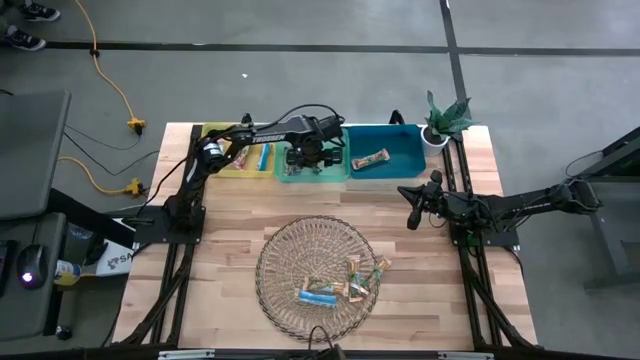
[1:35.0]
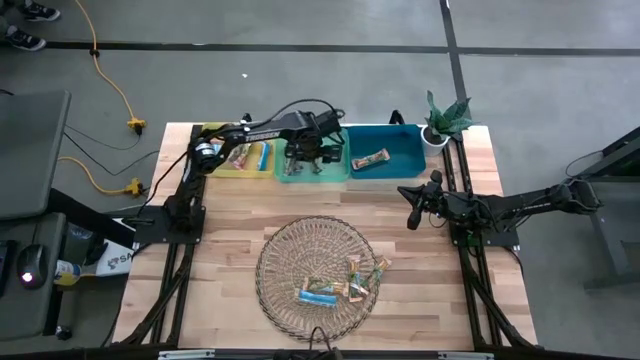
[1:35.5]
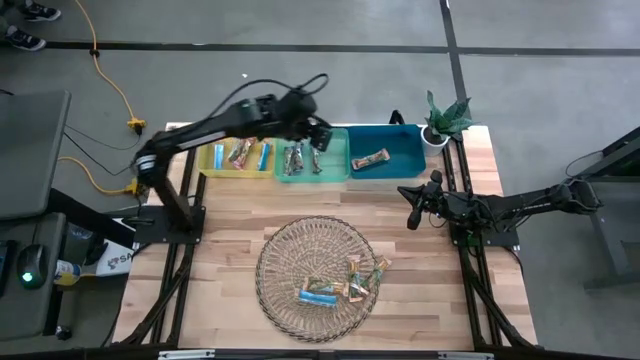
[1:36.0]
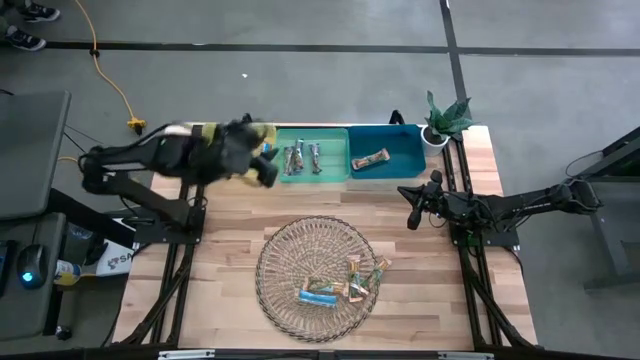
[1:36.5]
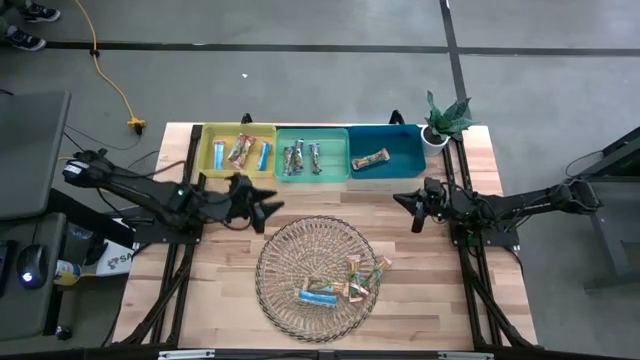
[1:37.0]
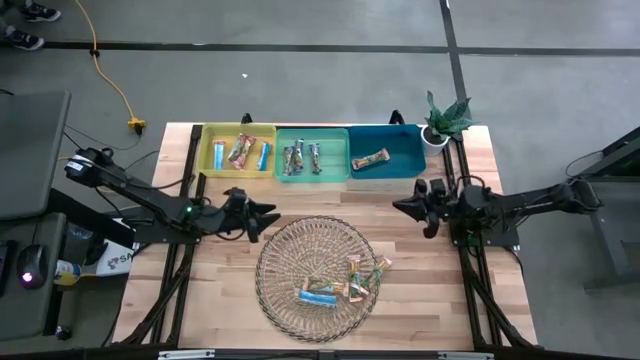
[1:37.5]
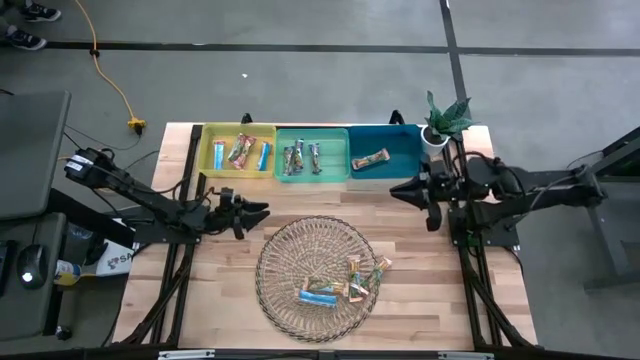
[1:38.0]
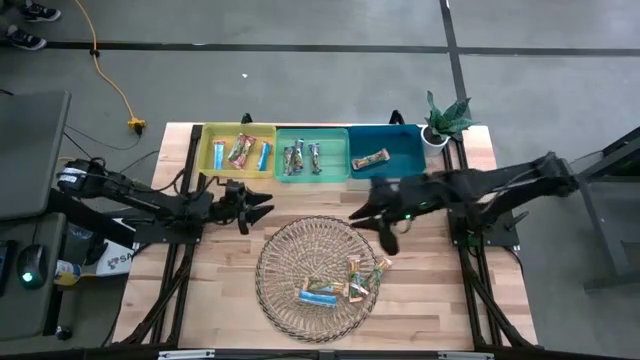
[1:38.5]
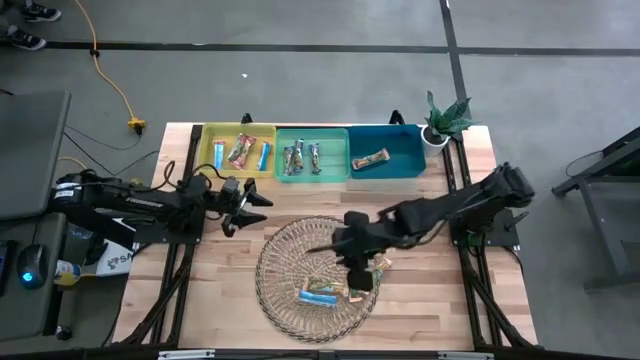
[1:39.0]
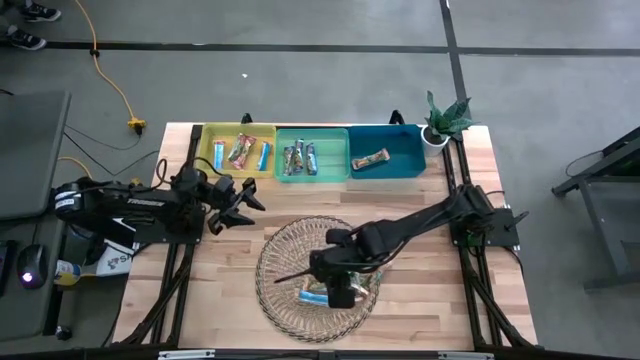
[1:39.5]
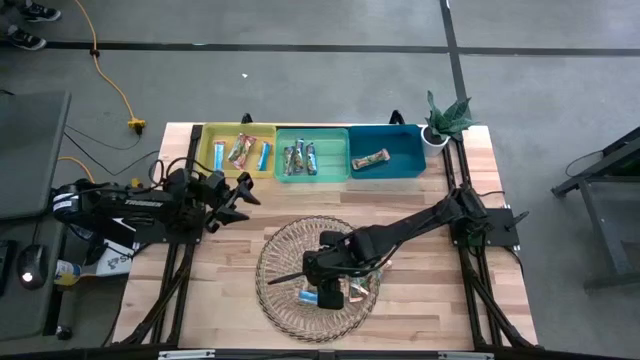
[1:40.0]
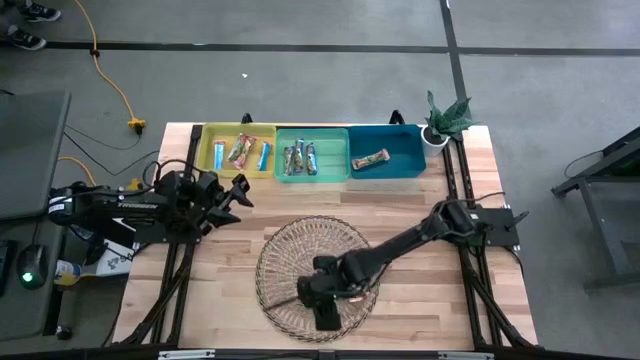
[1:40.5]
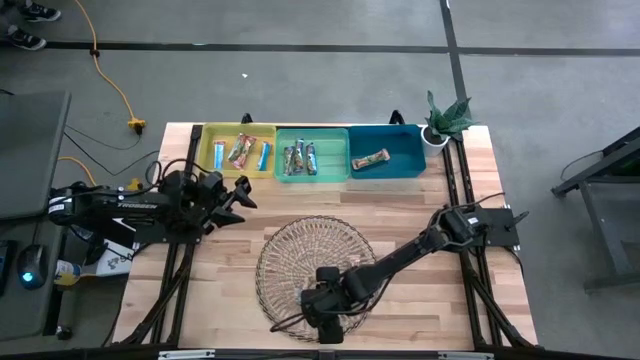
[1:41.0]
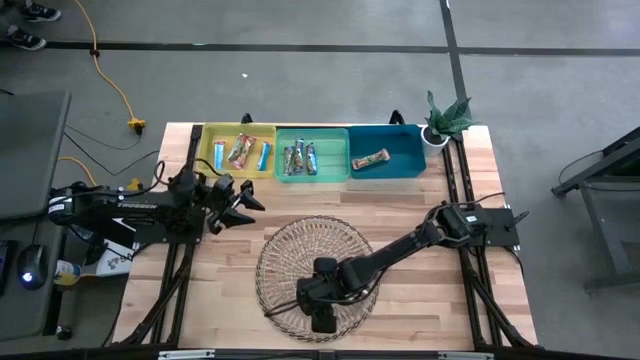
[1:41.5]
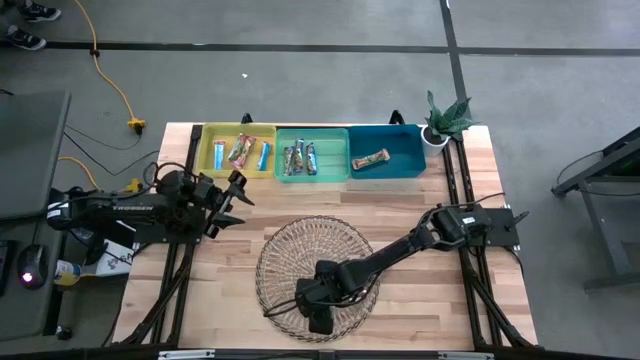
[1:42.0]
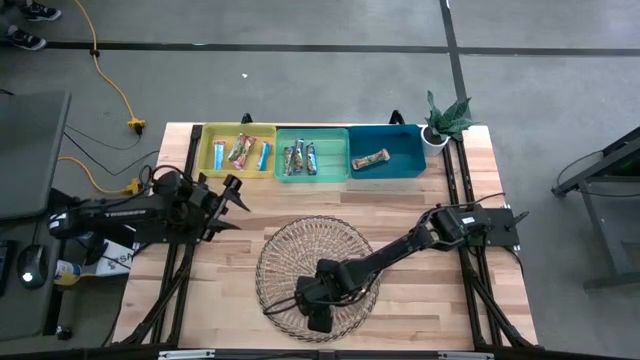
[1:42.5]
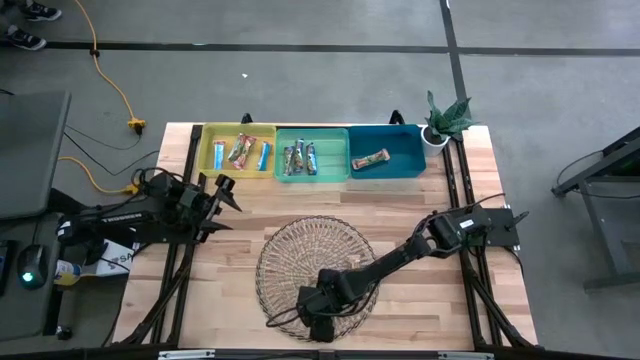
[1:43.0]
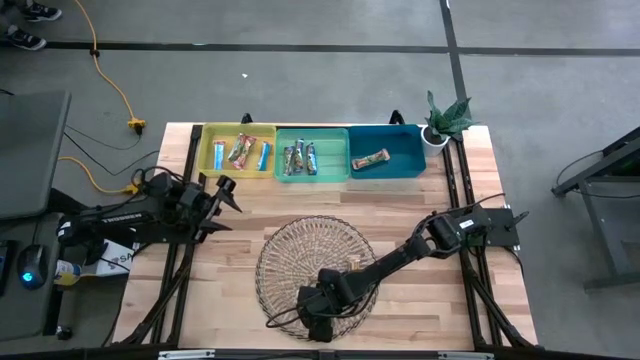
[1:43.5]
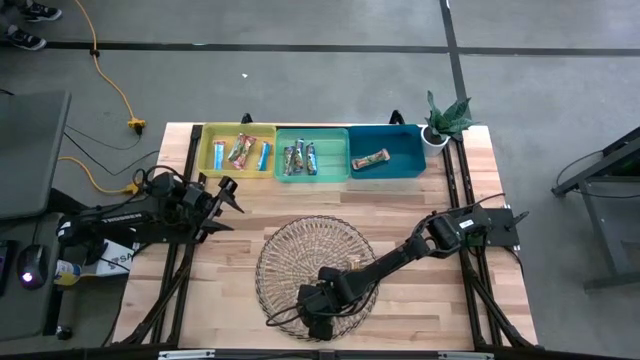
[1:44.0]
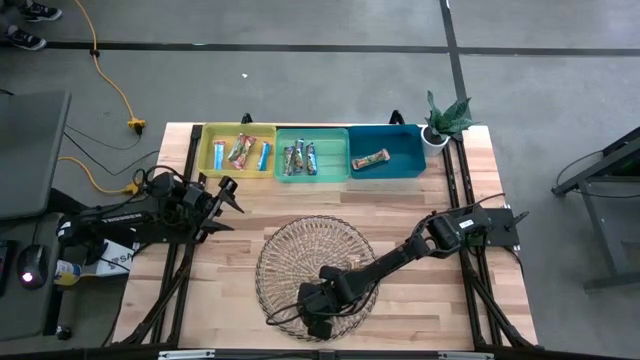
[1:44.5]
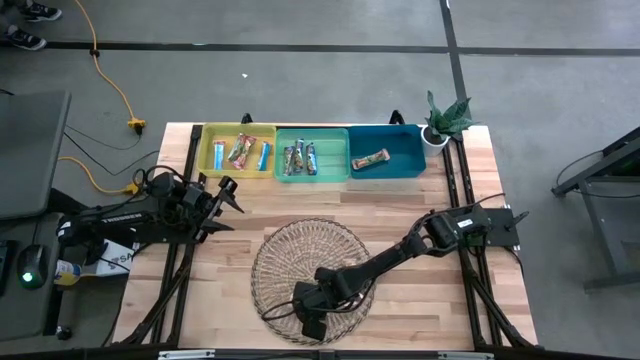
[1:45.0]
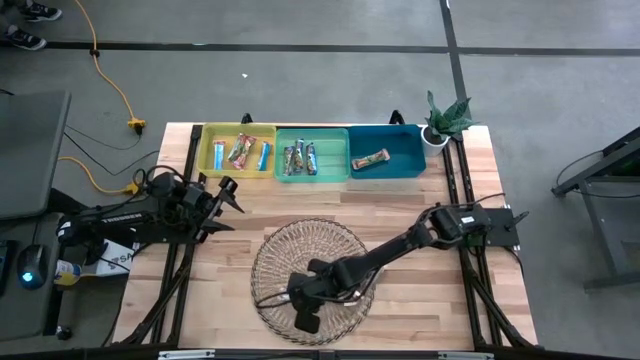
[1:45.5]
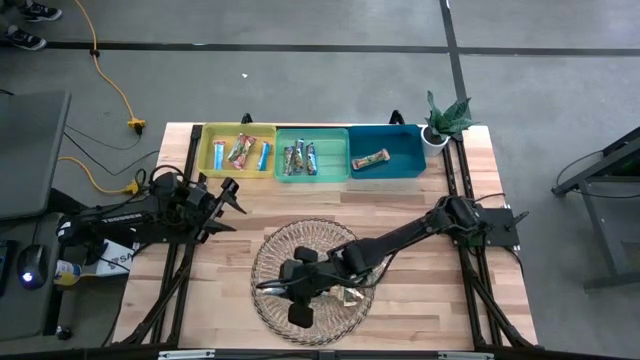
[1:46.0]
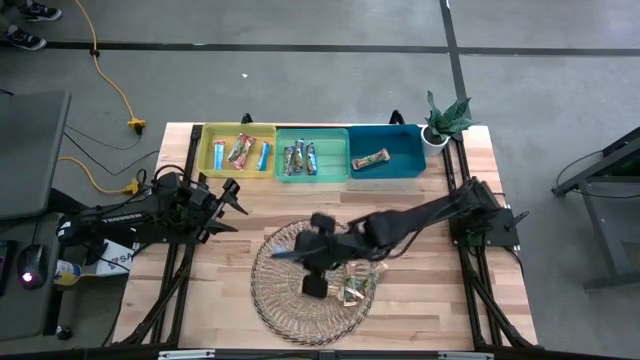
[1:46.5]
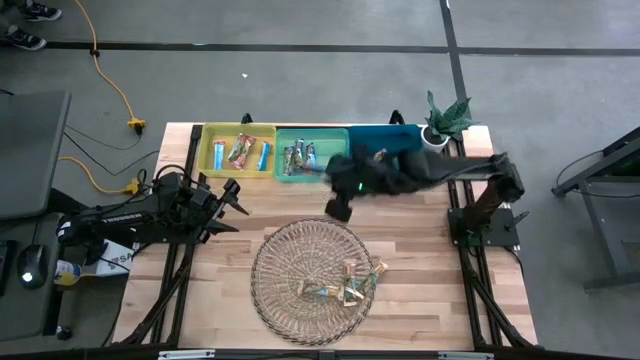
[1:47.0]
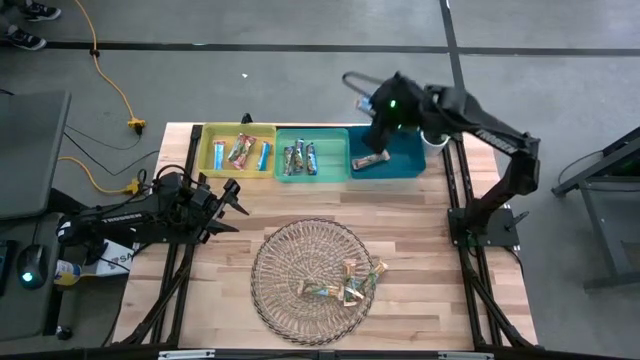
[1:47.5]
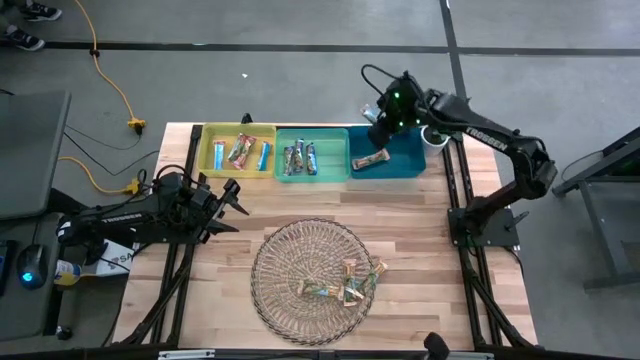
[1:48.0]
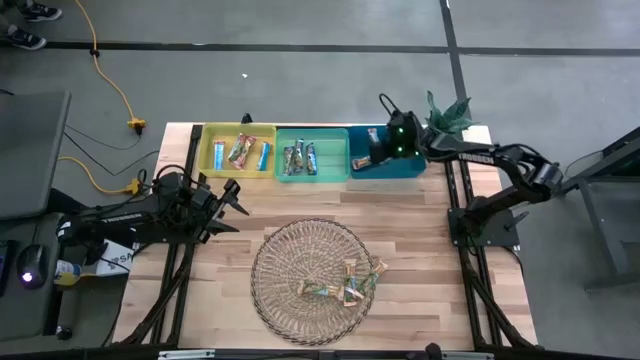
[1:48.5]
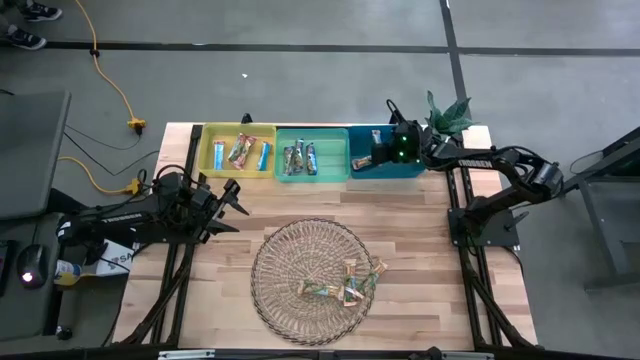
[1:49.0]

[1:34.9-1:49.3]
Task: Pick and place Granola Bars by type
Put the yellow granola bar into the blue bin

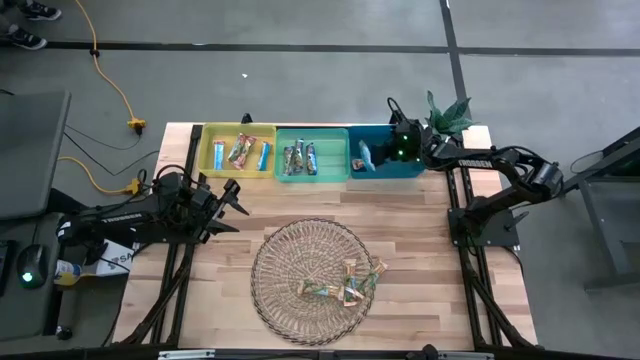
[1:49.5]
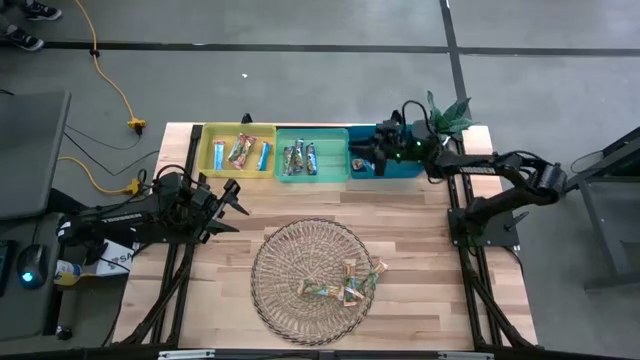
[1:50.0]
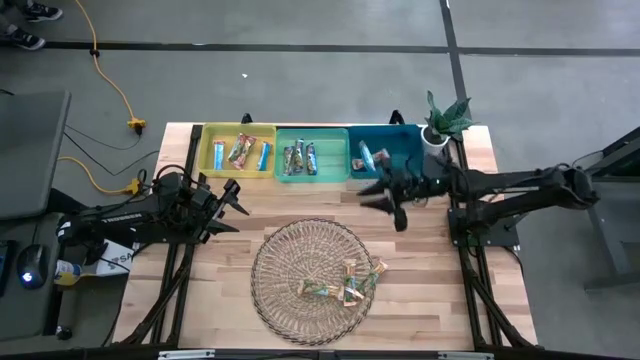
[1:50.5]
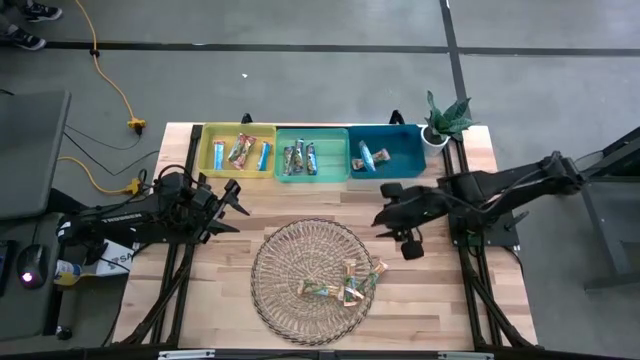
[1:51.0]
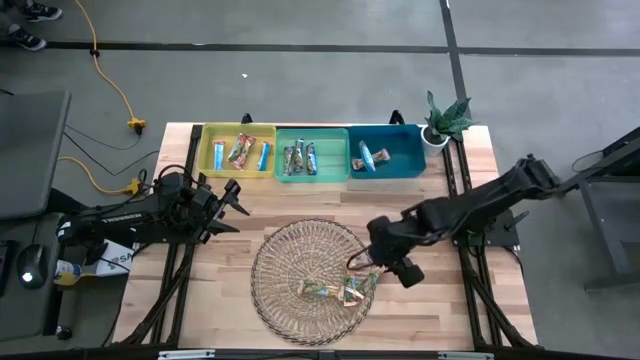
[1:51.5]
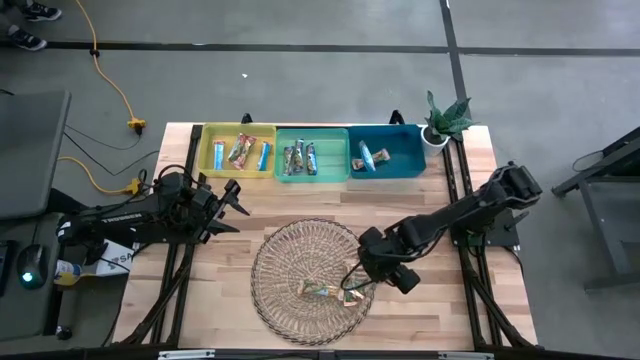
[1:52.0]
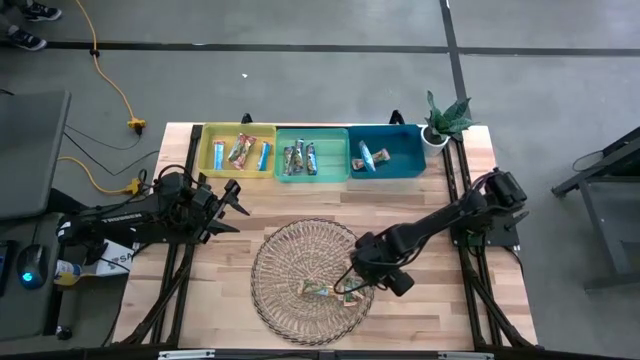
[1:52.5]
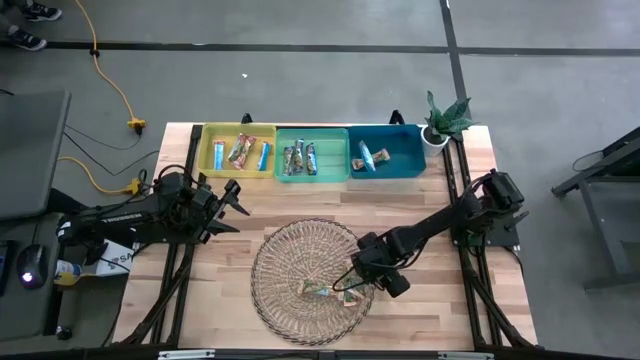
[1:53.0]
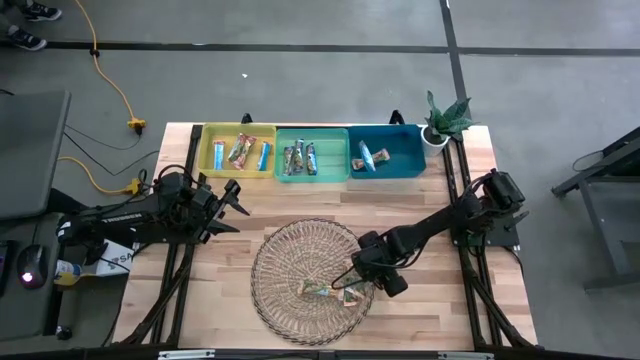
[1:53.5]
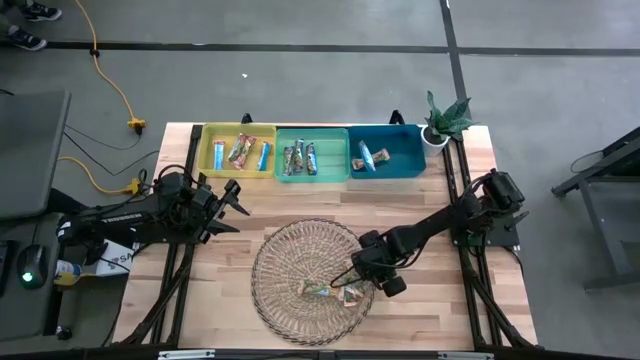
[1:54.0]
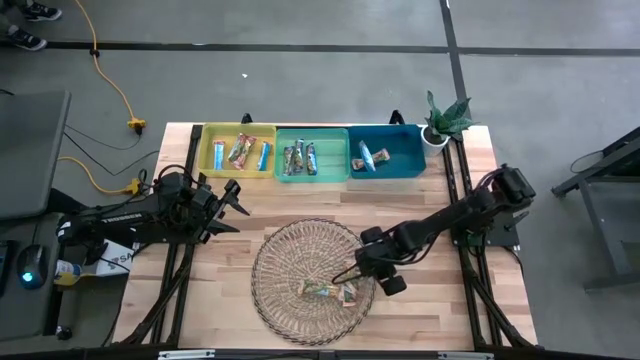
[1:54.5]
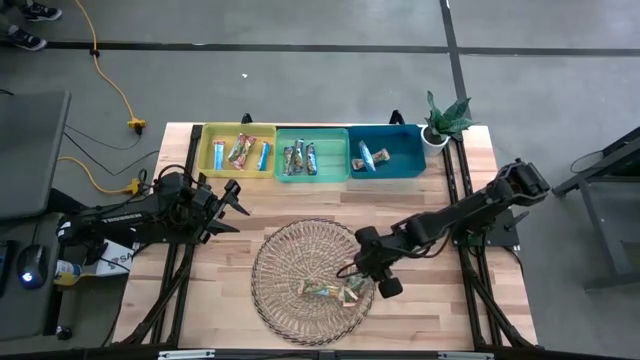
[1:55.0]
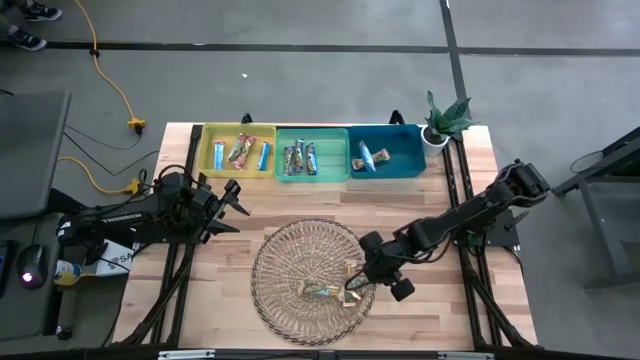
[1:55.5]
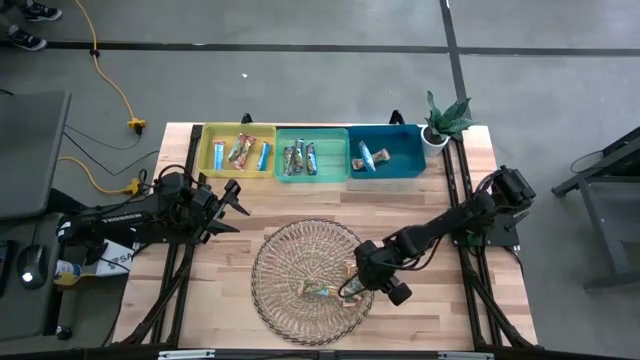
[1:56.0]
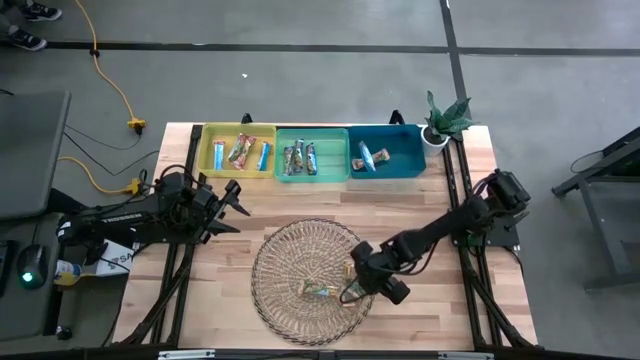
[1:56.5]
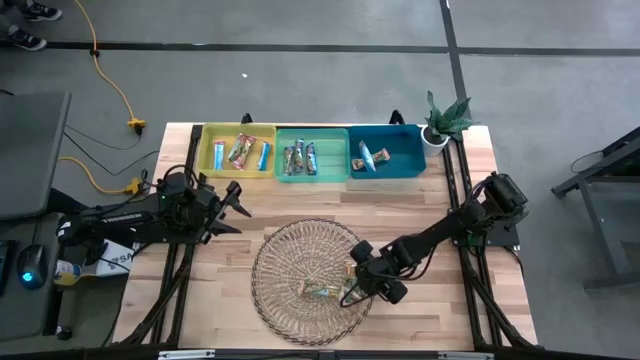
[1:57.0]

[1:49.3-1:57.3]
Put the yellow granola bar into the blue bin
